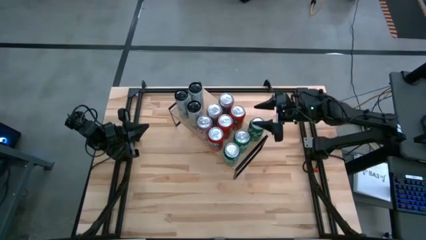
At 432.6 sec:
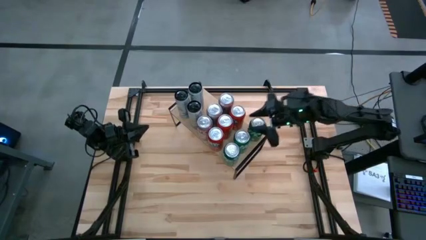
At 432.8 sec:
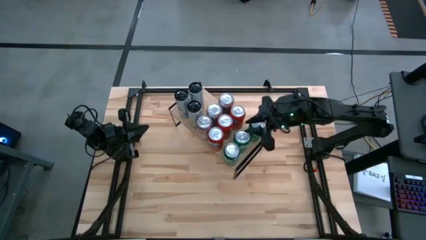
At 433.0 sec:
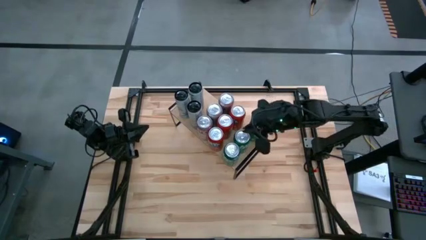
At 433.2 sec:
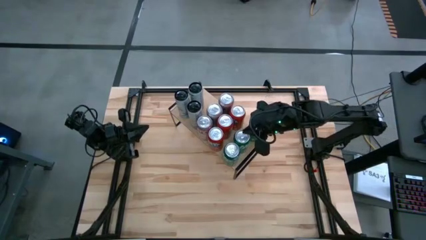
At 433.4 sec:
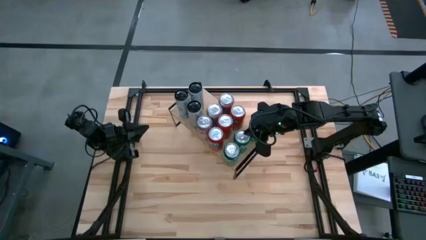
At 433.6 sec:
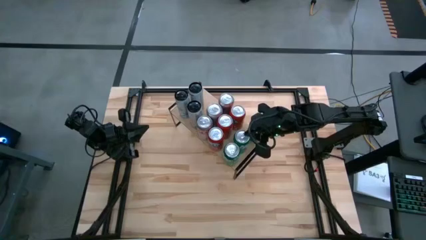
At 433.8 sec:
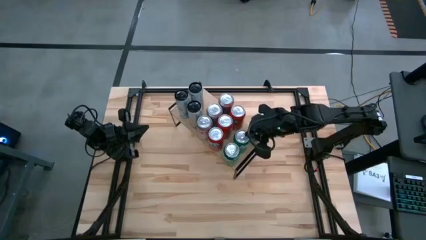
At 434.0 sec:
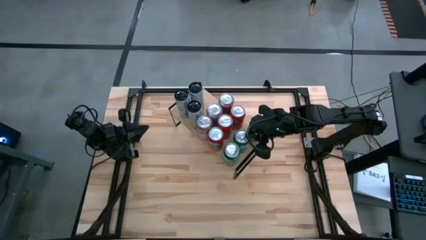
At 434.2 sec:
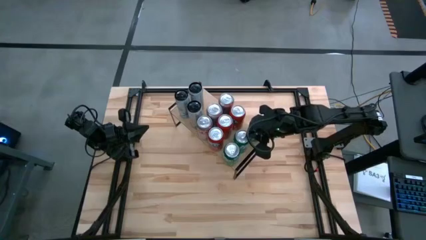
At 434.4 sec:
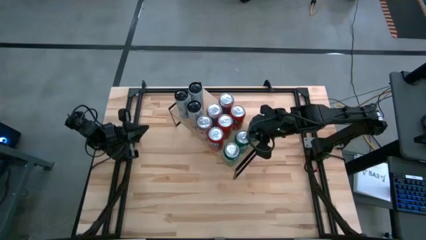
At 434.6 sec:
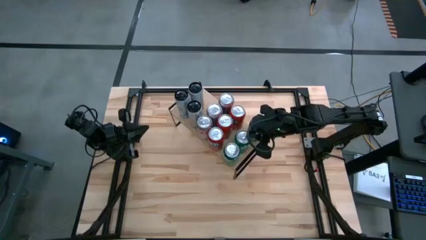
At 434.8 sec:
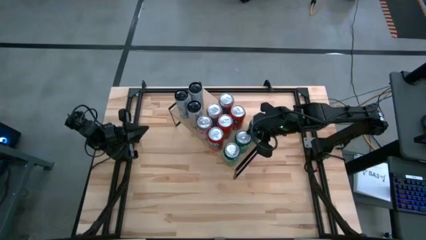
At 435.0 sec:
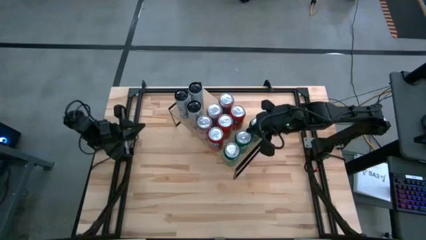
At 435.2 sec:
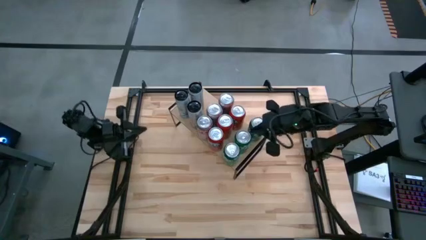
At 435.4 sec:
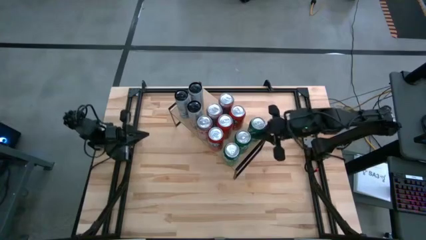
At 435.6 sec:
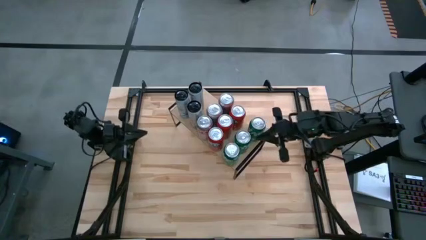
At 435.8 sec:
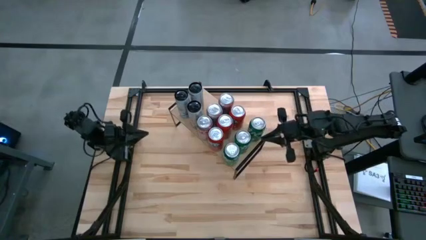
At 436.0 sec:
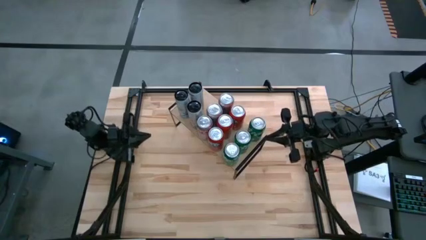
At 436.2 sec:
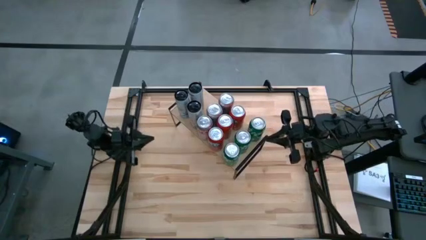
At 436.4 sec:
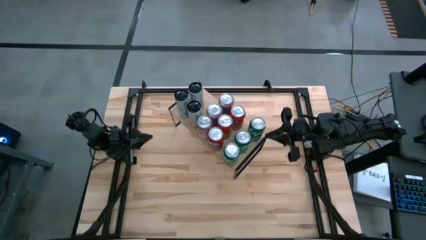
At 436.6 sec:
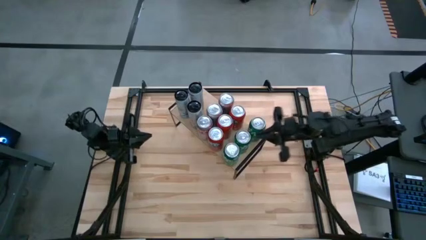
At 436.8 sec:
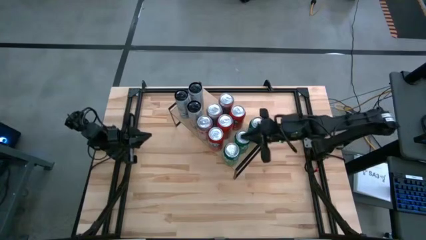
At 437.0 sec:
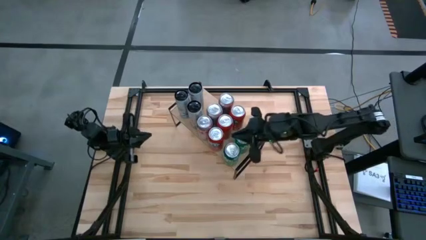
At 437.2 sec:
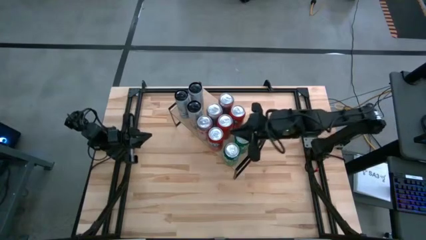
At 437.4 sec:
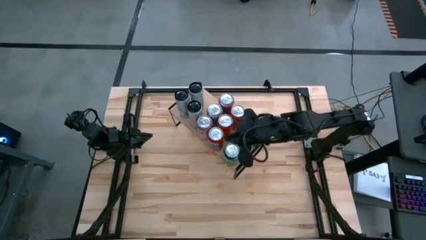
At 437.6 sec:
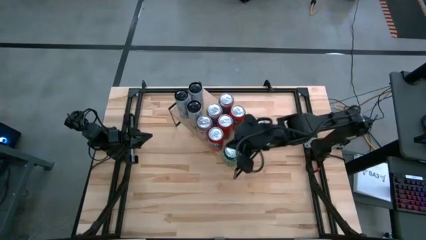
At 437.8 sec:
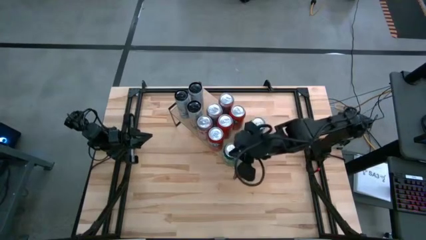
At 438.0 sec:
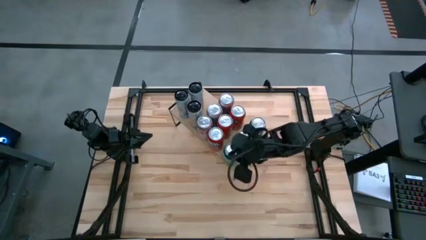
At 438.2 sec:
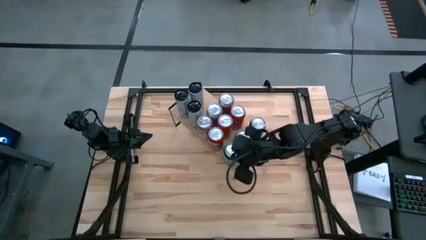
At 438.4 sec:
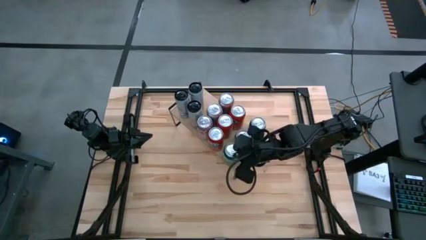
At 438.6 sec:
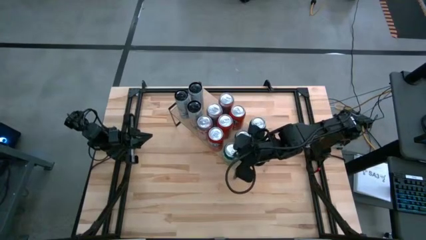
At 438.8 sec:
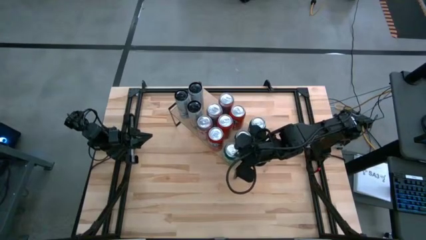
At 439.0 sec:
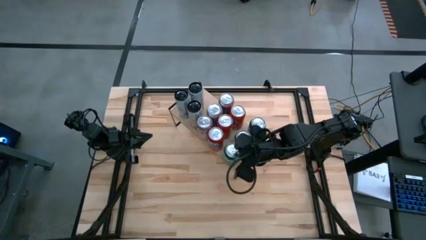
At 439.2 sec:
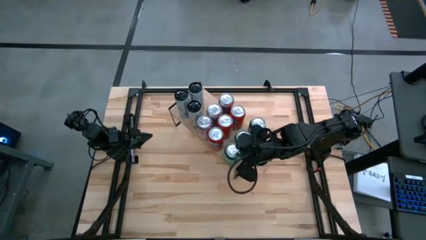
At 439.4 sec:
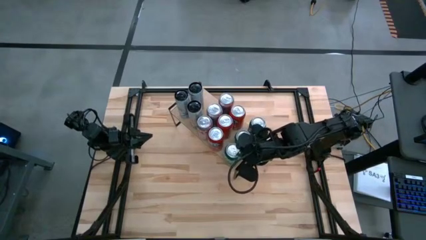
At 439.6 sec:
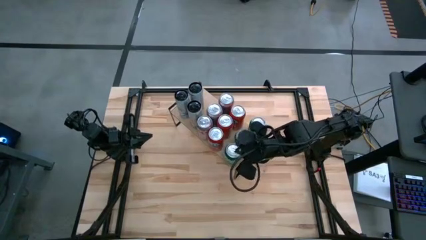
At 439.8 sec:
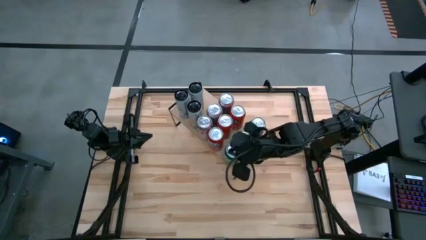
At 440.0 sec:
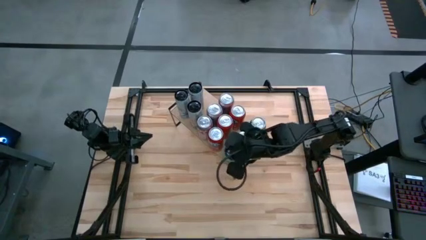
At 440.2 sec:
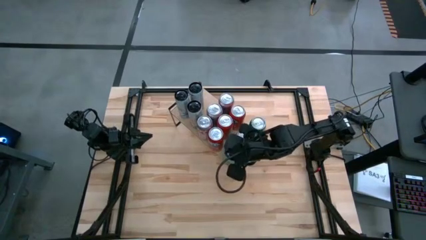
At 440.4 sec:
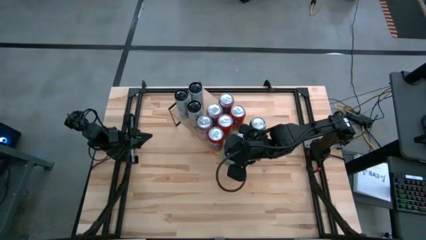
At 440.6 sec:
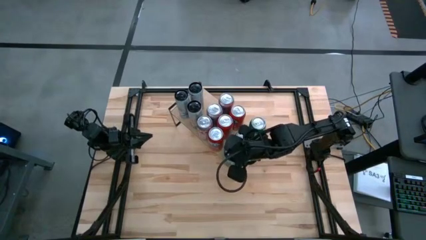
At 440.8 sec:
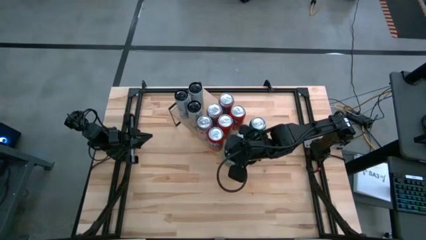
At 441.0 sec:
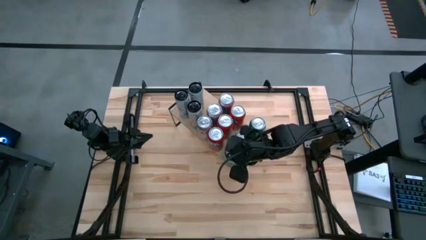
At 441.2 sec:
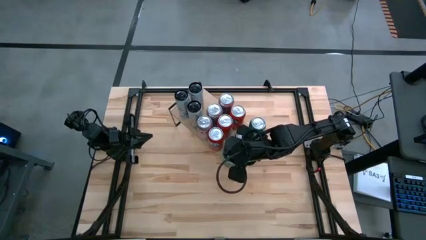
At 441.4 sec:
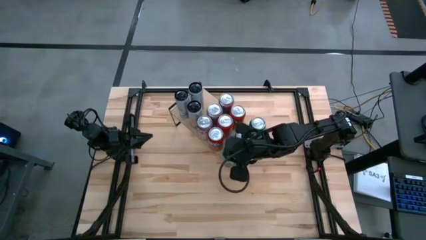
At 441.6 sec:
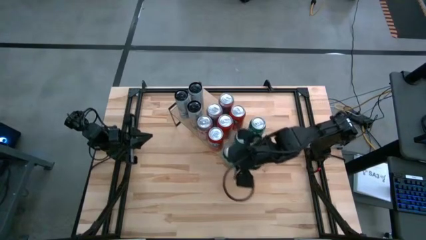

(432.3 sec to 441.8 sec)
Task: Place canned beverage on shelf
Adjust the green soda can

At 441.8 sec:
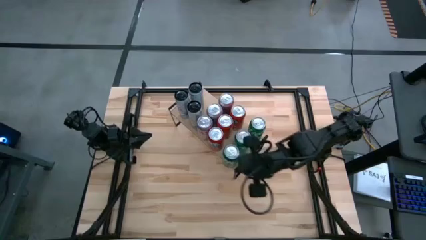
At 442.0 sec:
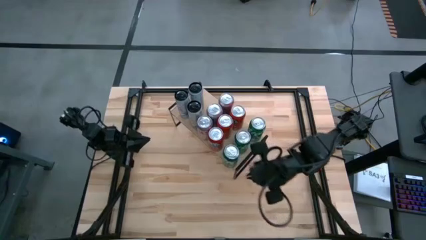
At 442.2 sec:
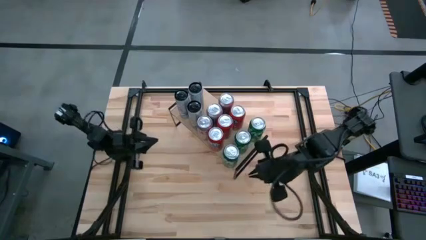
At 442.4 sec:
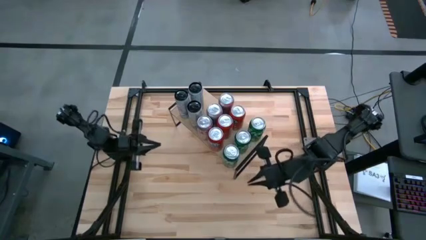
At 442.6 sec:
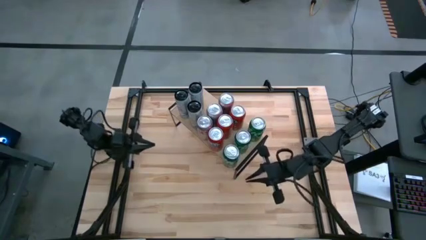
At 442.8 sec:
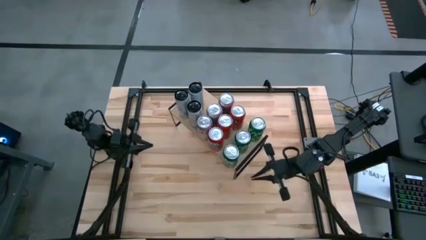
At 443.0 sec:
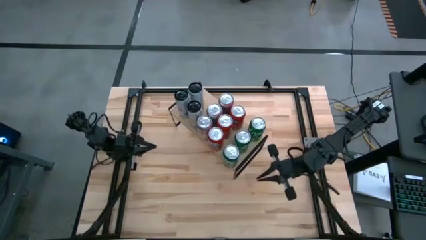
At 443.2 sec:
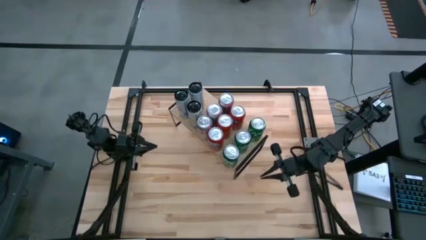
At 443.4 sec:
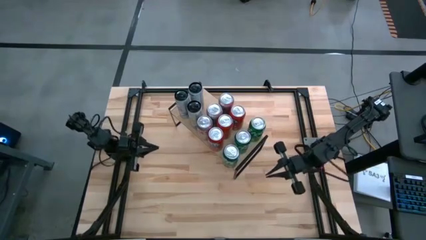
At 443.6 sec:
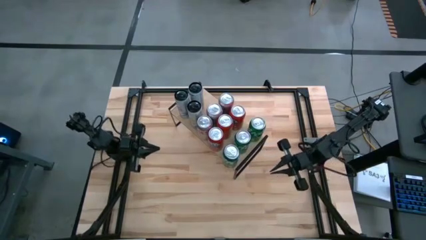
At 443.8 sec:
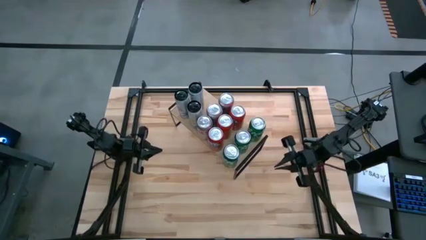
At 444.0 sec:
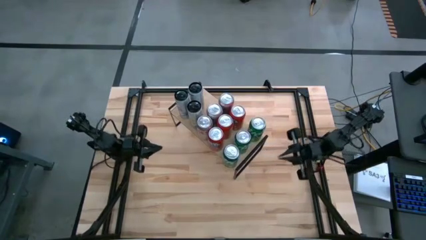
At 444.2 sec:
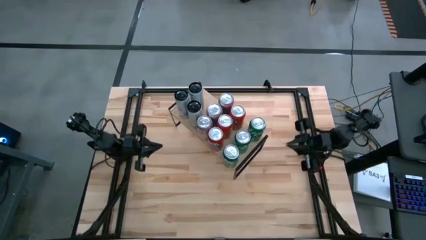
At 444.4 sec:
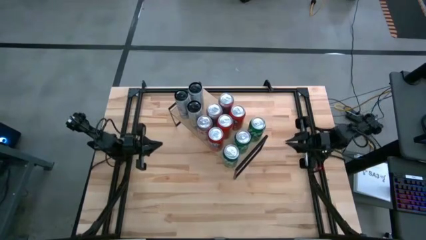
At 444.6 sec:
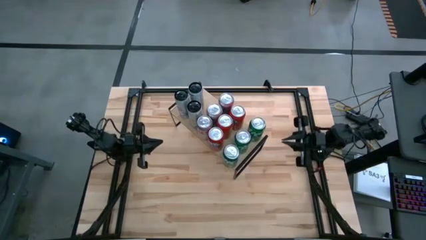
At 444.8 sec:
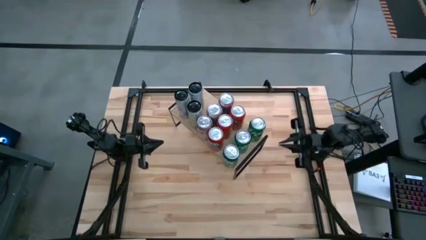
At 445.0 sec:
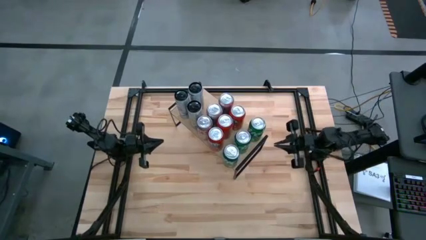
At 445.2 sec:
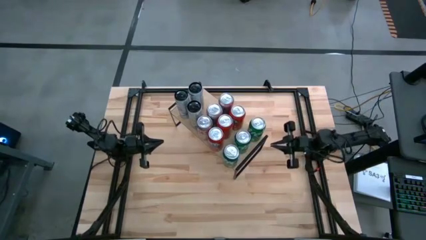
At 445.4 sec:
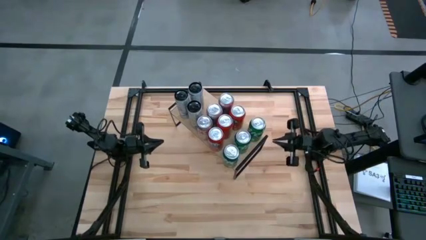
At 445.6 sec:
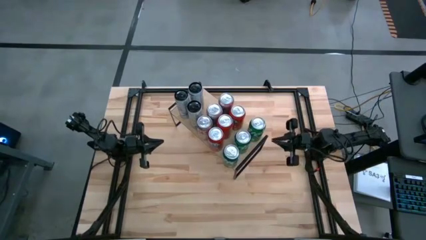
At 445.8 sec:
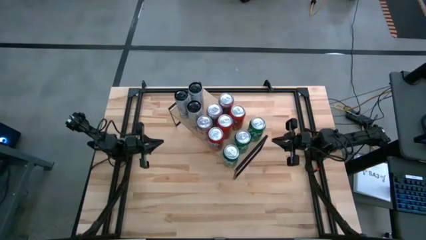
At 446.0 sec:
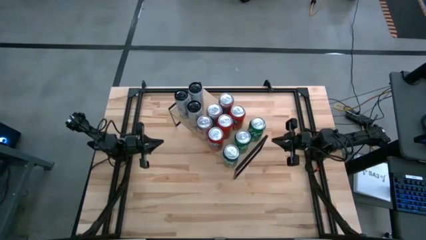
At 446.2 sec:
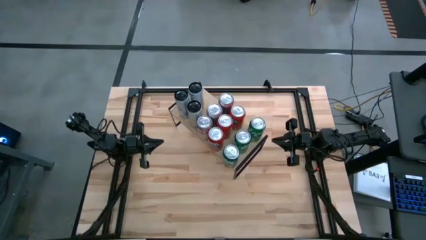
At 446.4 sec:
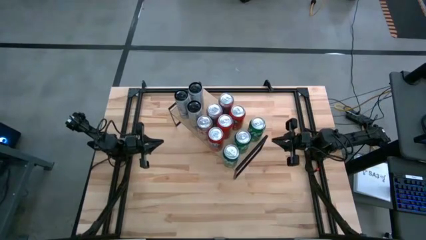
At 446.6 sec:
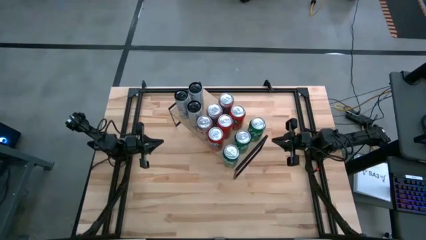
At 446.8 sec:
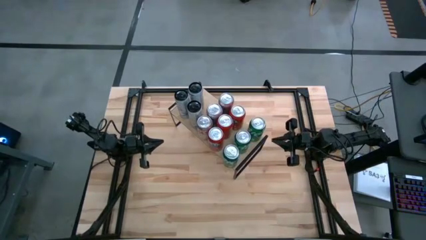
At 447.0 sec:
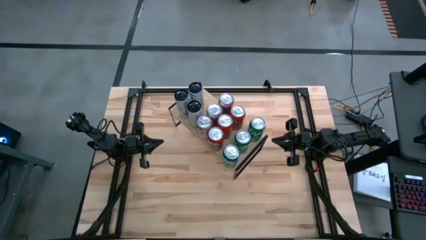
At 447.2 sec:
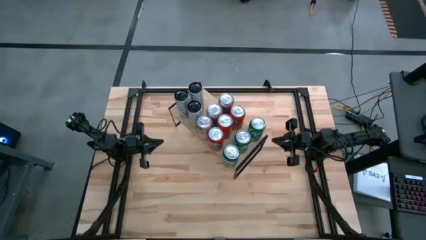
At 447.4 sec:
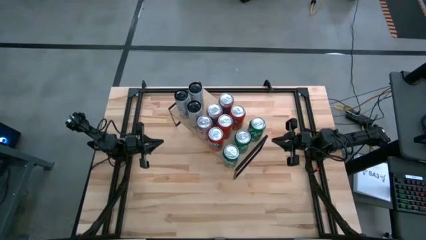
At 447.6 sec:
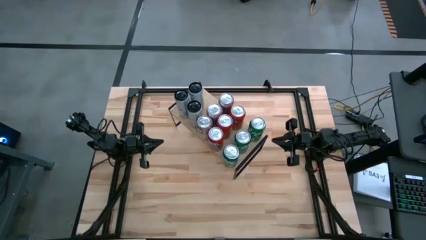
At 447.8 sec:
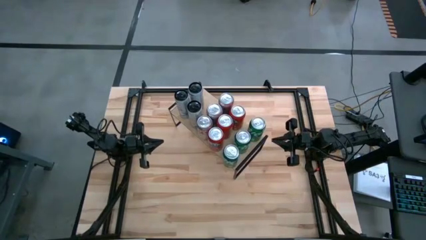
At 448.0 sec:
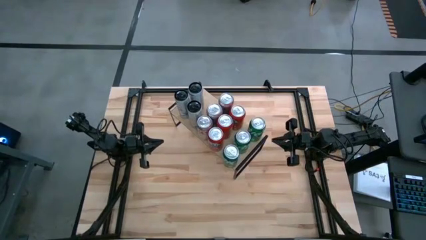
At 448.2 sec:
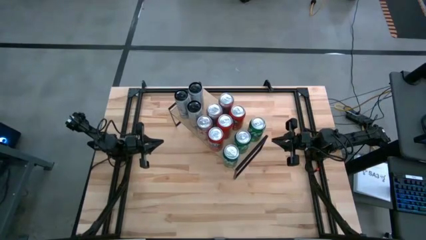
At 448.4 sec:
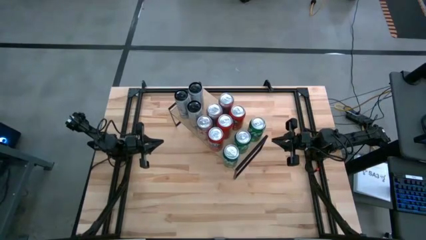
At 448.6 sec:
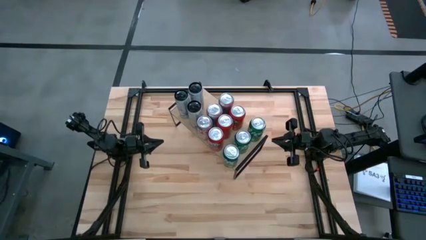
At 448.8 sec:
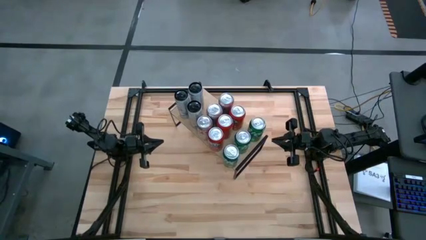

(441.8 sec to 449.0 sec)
Return to Home Position

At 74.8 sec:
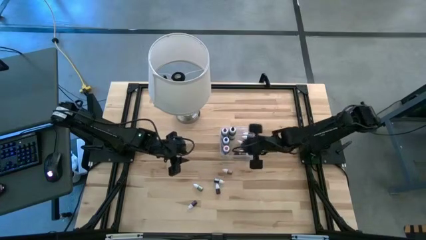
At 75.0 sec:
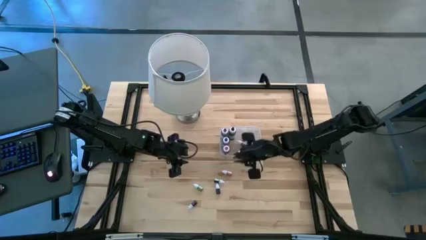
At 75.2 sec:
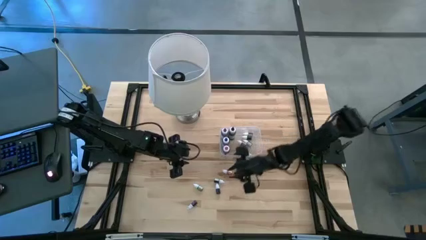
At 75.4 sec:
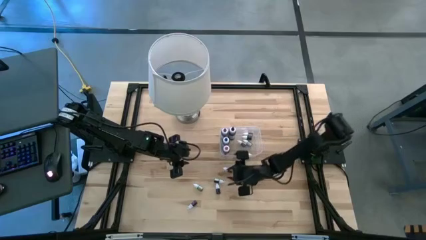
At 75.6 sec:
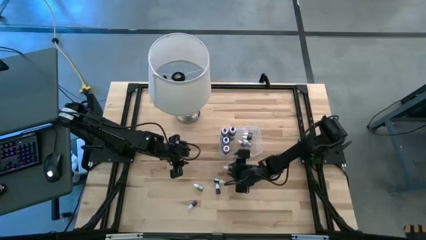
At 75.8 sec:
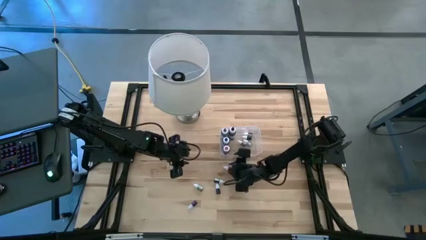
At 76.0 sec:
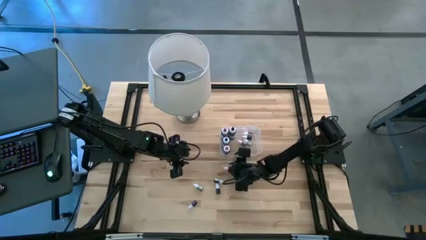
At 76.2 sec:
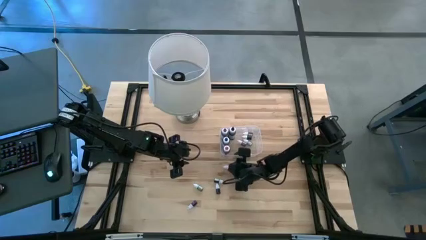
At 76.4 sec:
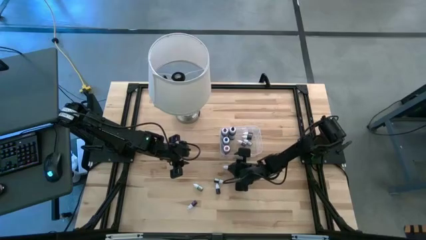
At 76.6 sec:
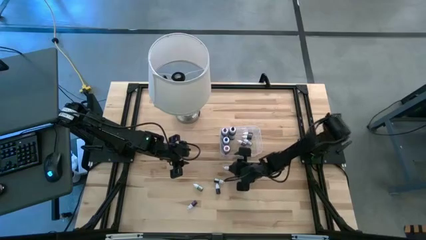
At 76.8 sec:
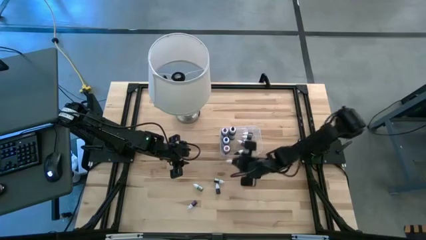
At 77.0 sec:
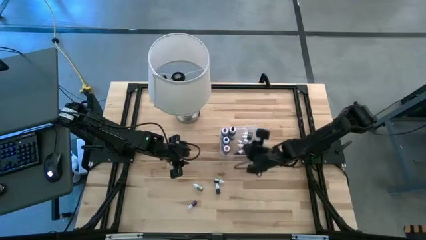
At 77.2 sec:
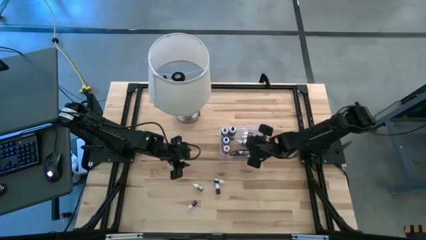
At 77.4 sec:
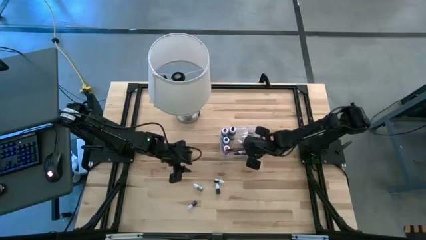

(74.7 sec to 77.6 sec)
Task: Pick & Place food coloring
Put the small orange food coloring bottle into the transparent bin
